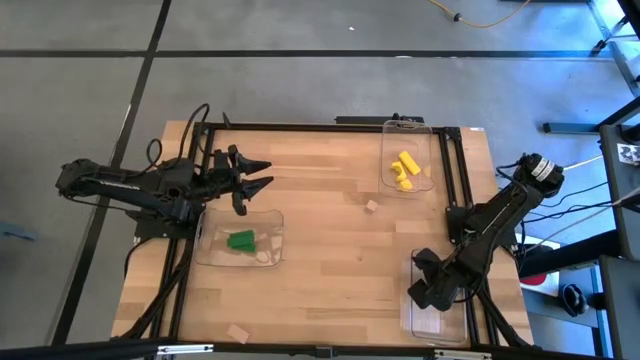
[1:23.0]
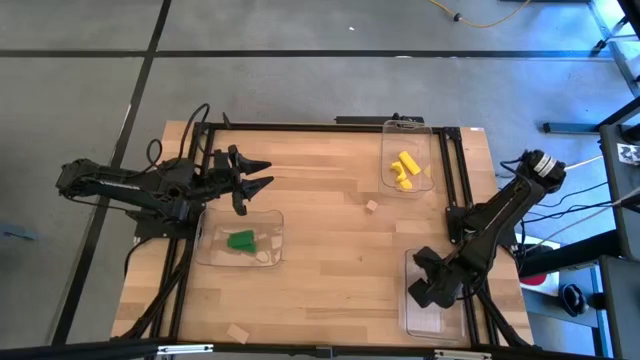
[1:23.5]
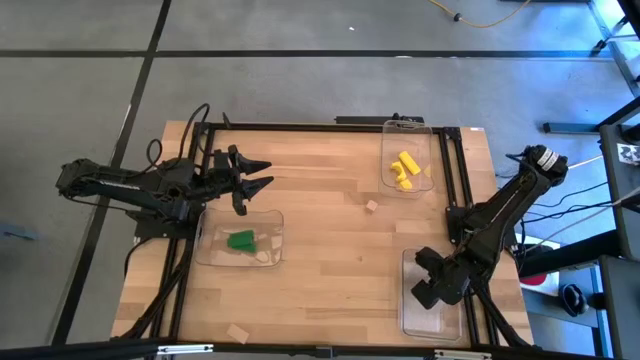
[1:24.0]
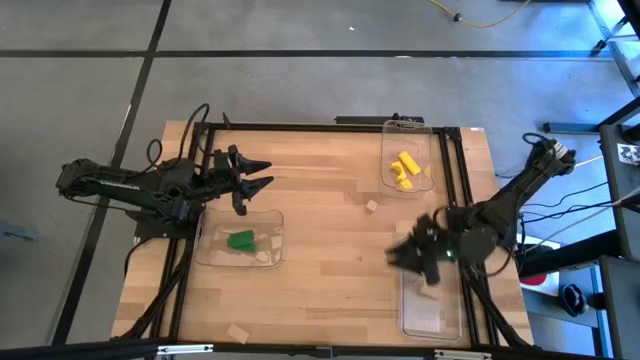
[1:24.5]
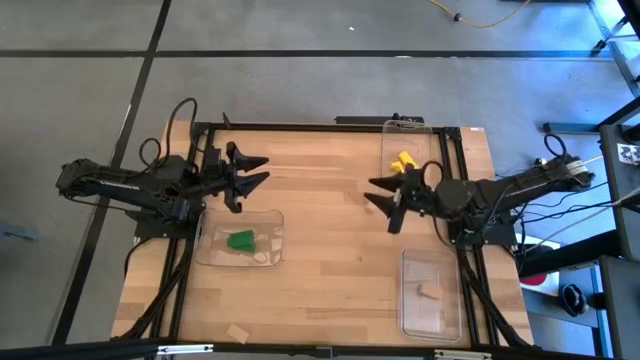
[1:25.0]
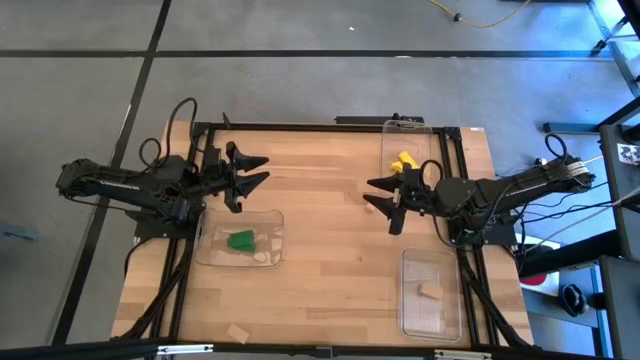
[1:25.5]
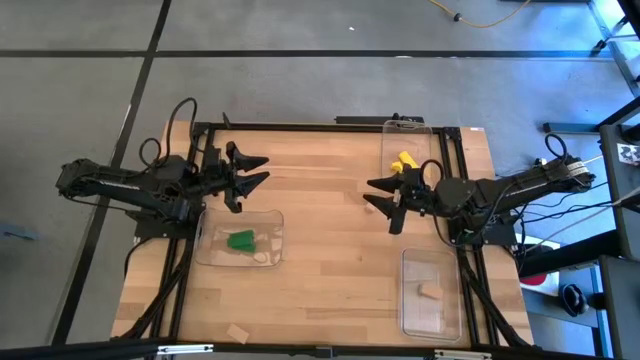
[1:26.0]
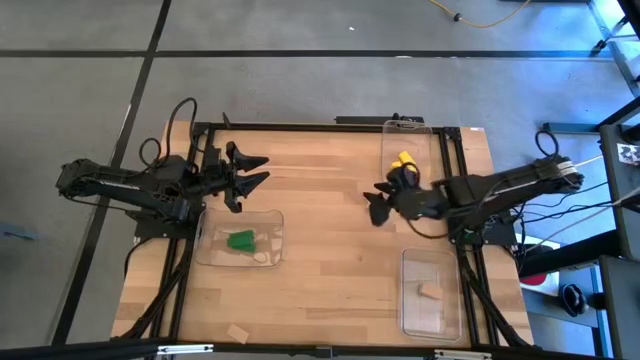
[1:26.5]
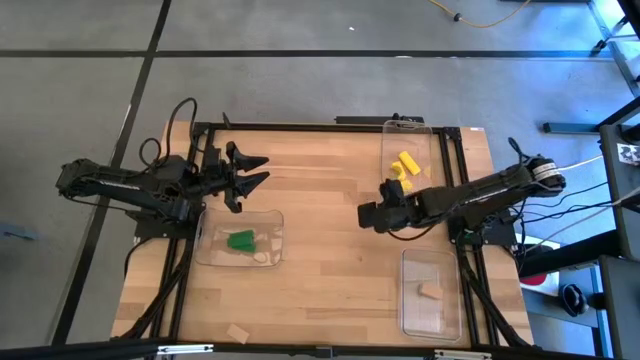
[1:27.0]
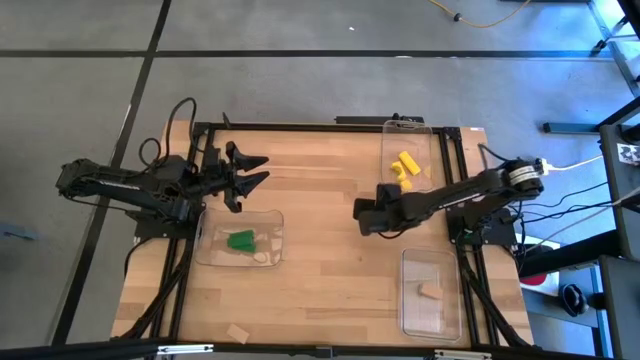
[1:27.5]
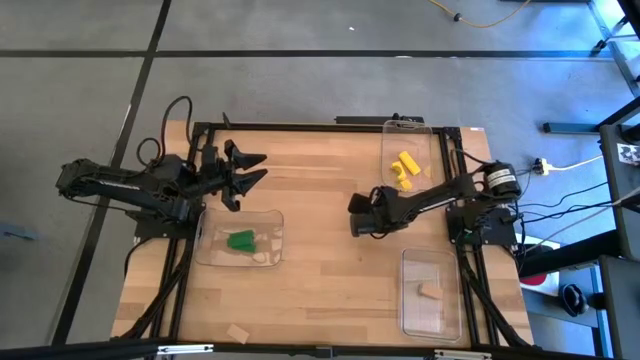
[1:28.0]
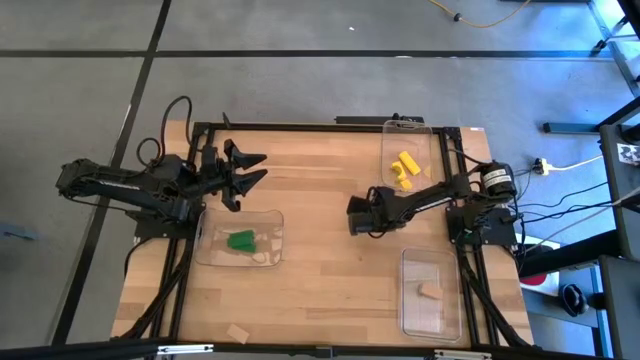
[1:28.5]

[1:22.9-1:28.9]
Task: Sort & place blocks by color
Put the top brown block into the bottom right transparent bin

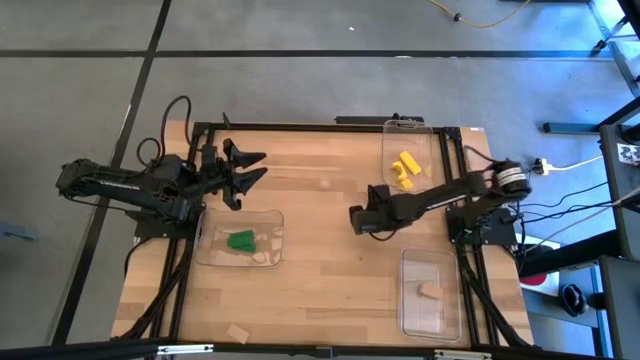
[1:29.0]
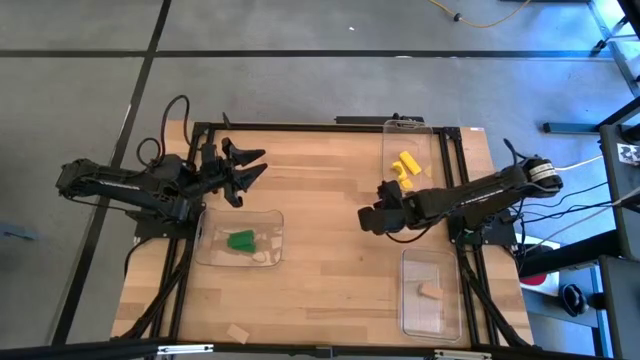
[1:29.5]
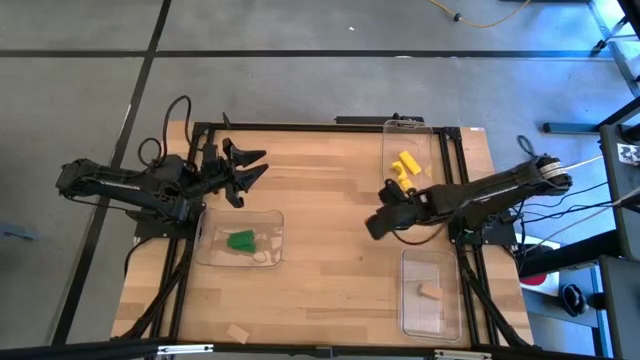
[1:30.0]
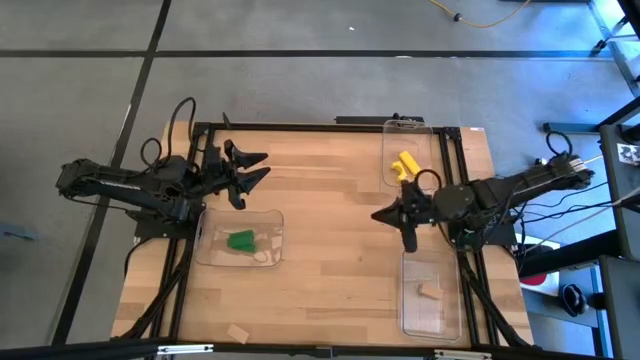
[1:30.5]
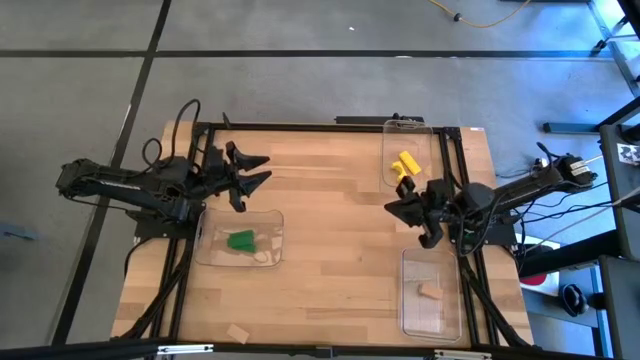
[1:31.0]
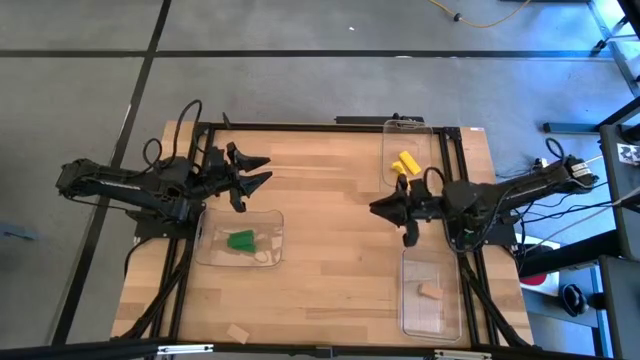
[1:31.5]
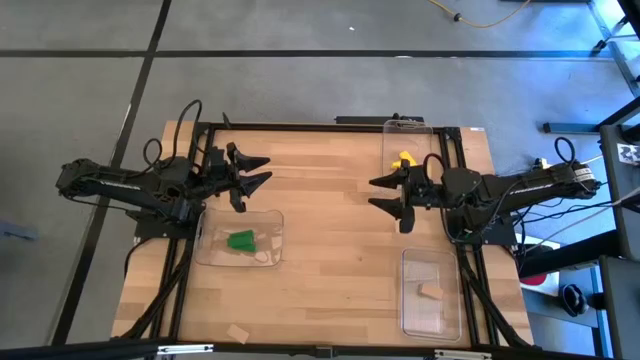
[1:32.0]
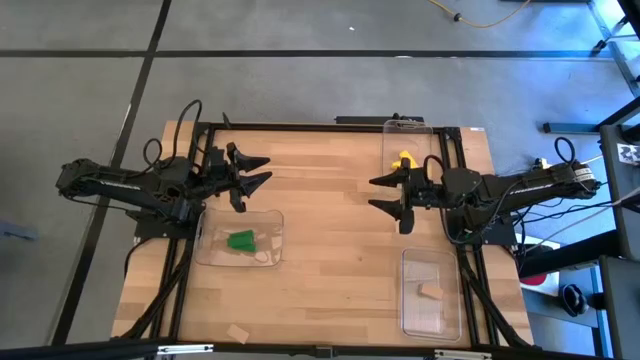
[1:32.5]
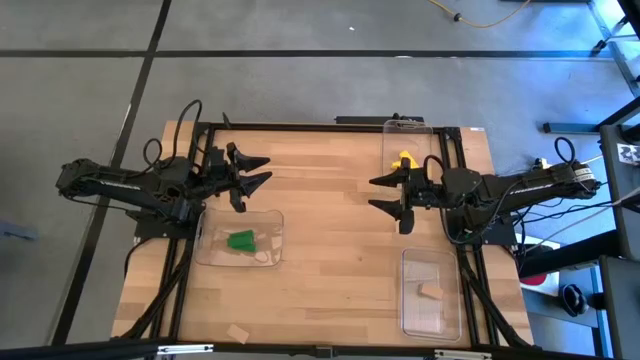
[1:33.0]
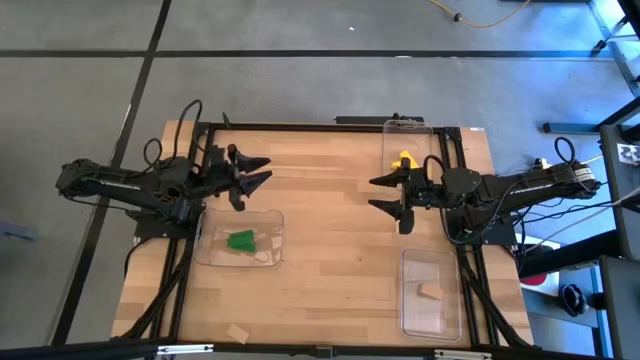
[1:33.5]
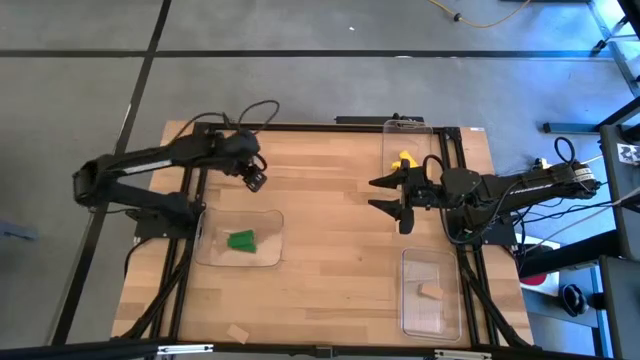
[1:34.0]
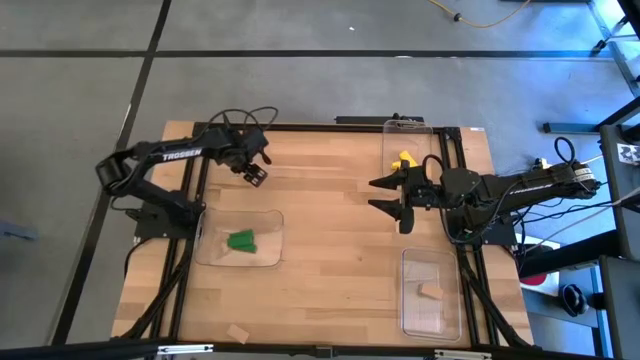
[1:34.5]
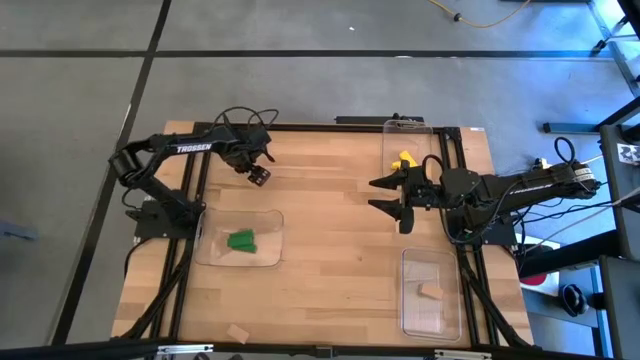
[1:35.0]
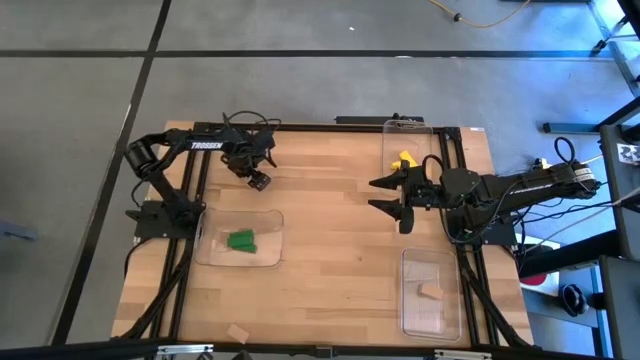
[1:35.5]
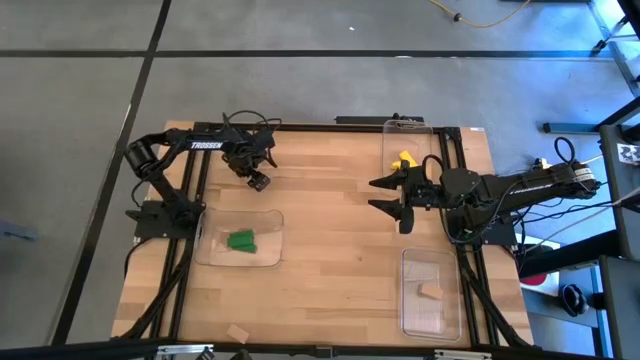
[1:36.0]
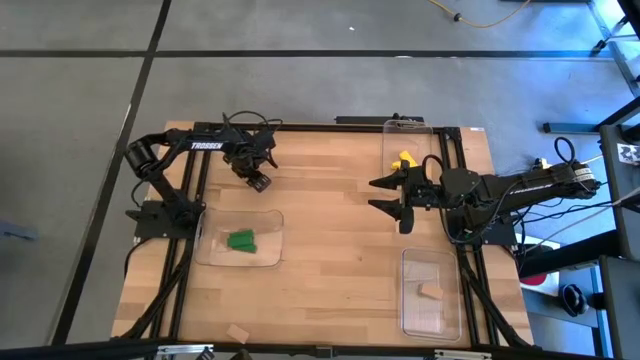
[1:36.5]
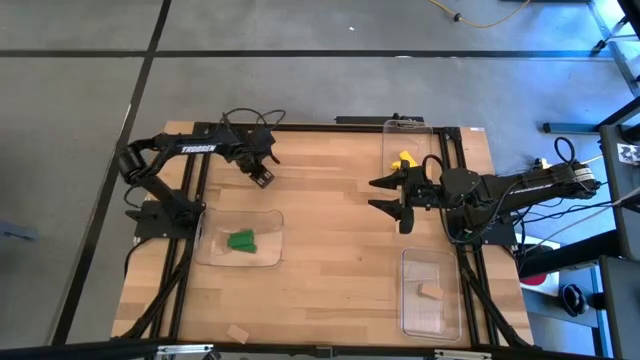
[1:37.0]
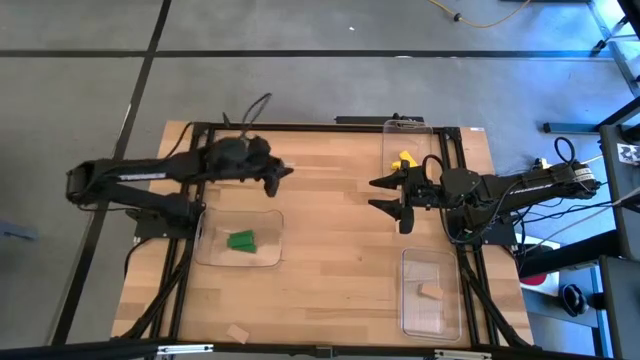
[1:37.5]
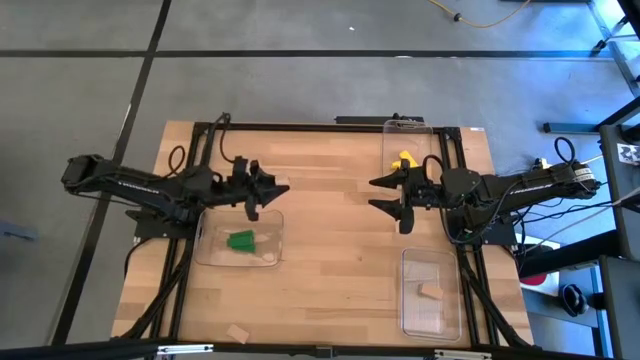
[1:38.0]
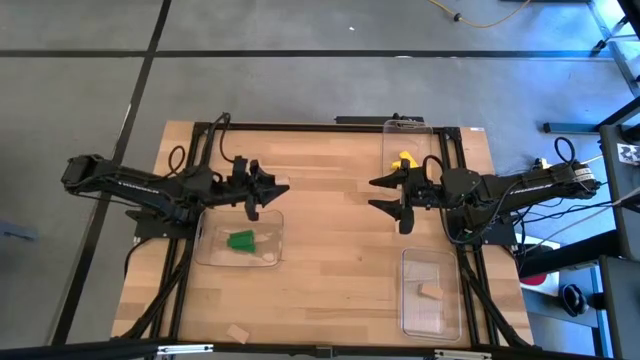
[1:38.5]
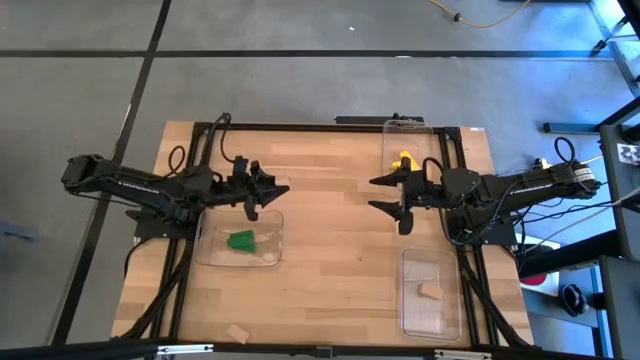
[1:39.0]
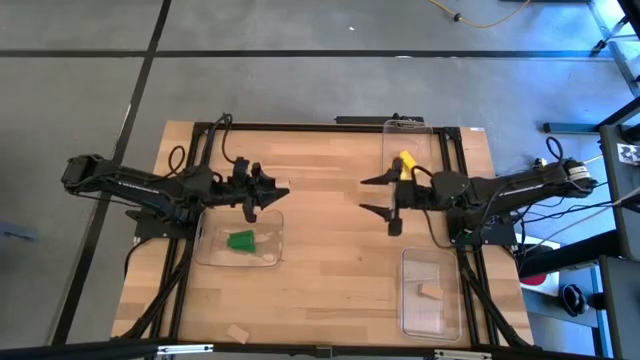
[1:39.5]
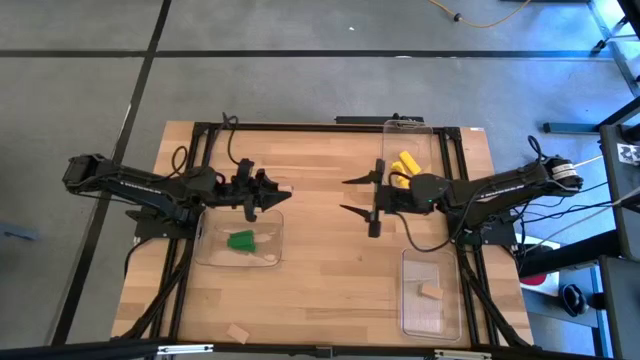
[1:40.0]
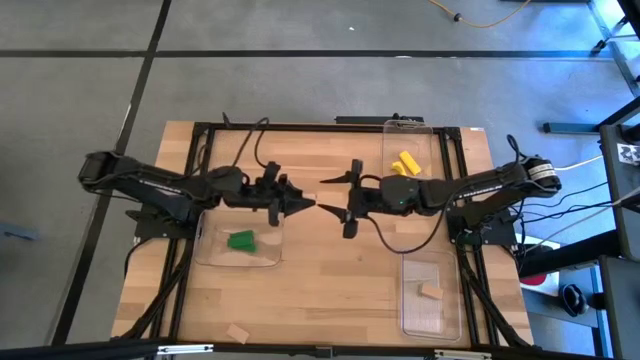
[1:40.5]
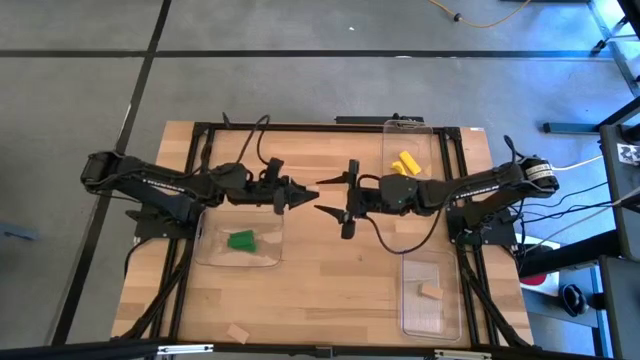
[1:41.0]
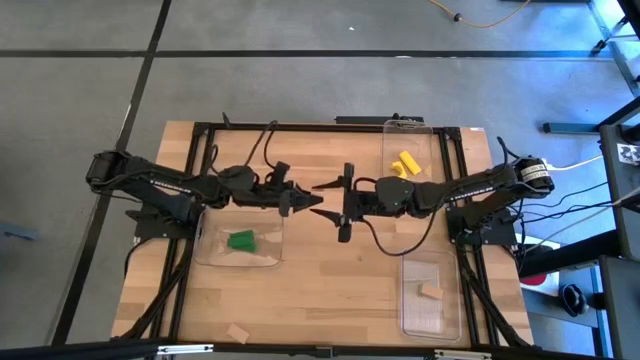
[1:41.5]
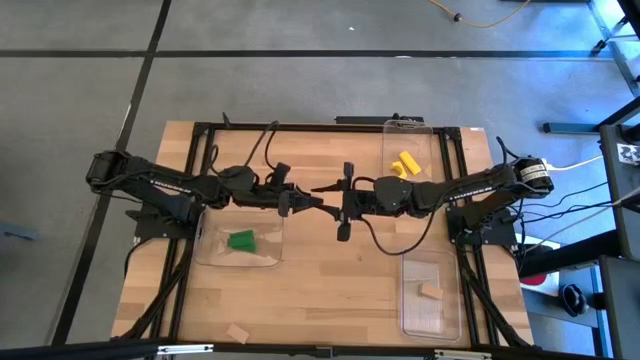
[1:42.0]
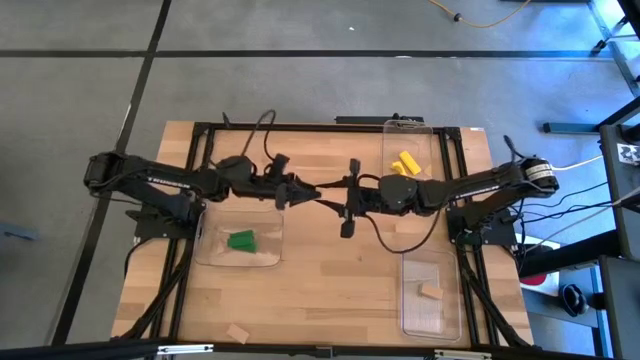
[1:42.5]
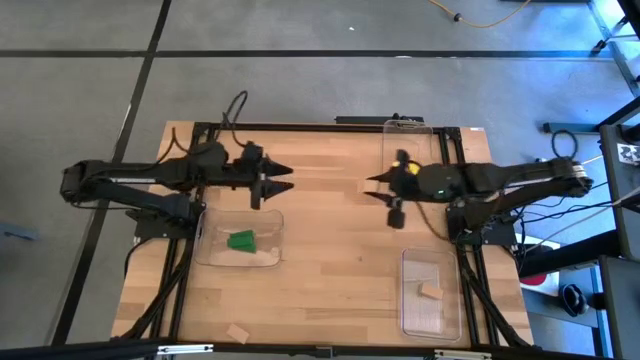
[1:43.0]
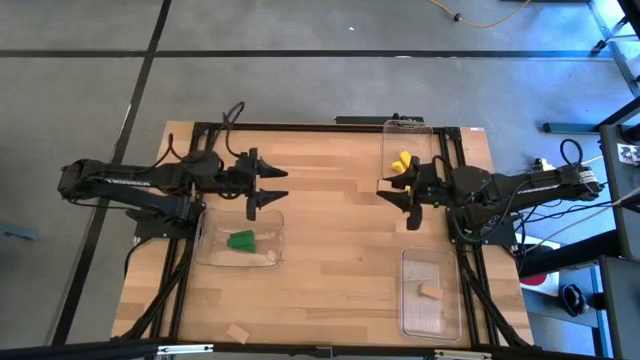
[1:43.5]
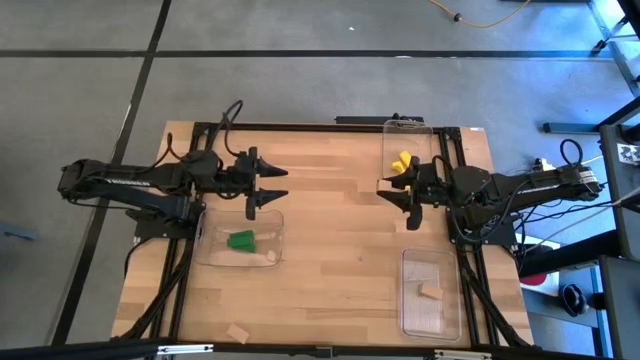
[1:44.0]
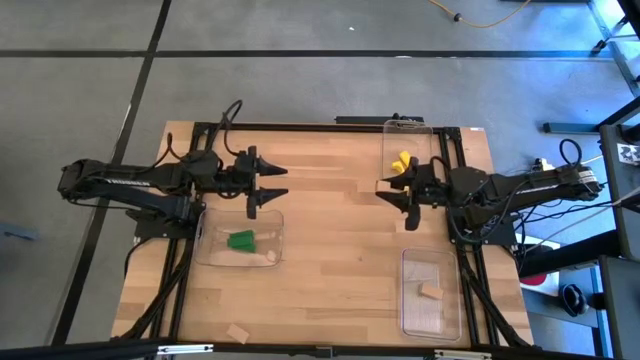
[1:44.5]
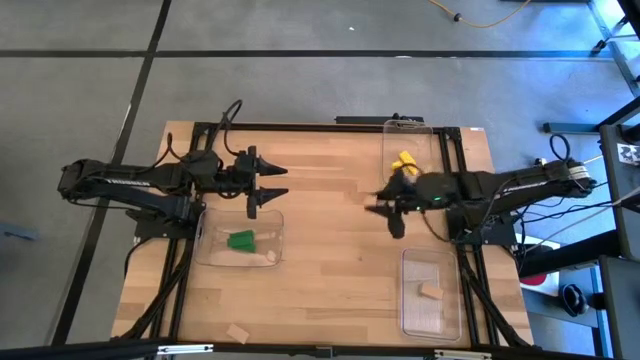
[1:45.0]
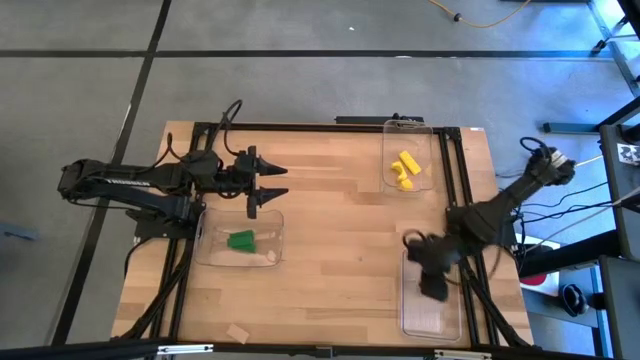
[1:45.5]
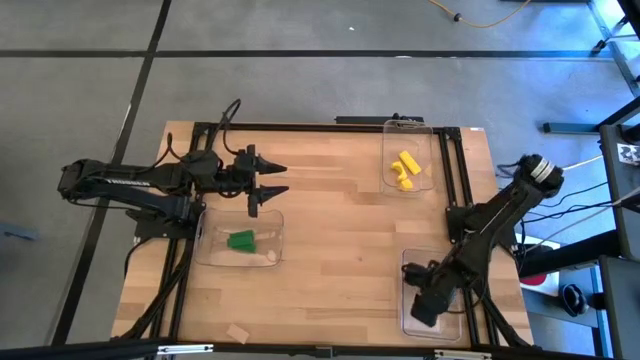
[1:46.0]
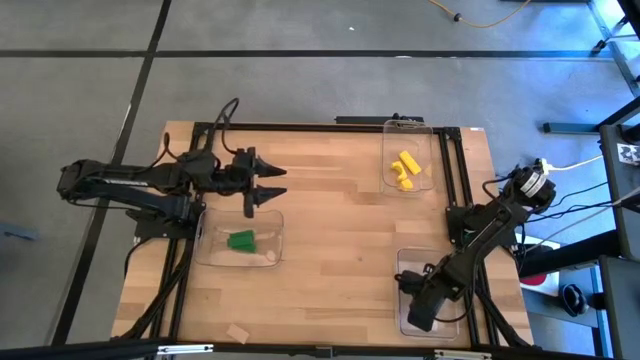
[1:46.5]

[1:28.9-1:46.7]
Put the top brown block into the bottom right transparent bin
